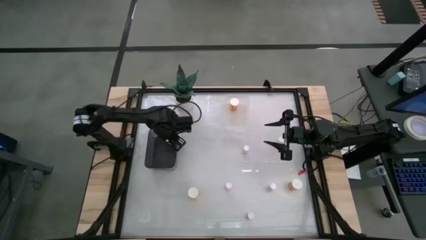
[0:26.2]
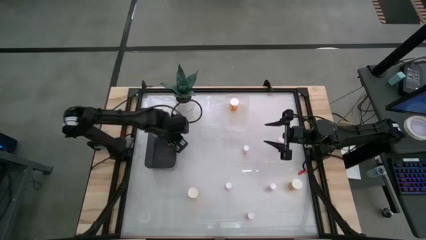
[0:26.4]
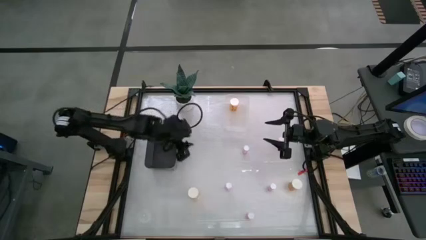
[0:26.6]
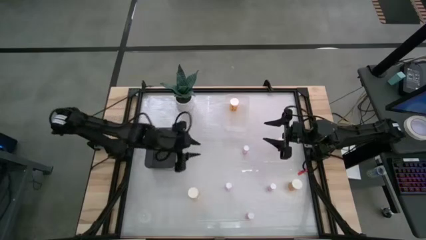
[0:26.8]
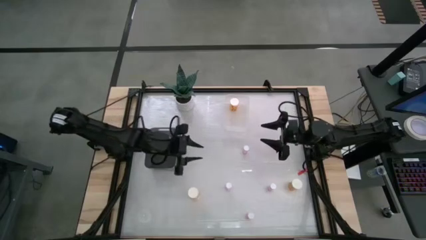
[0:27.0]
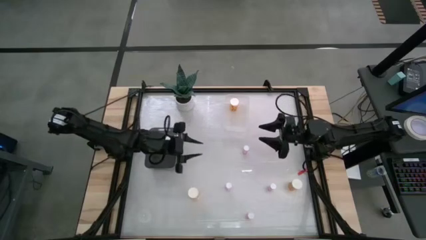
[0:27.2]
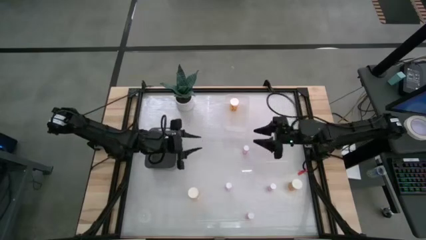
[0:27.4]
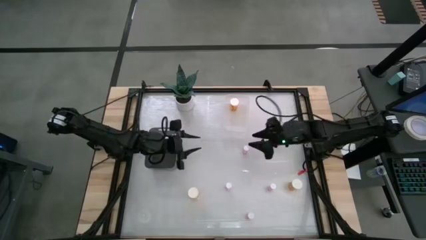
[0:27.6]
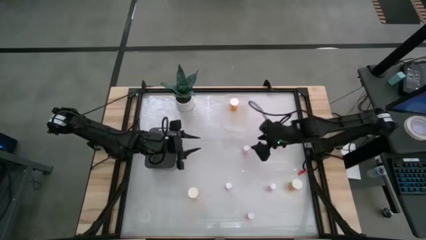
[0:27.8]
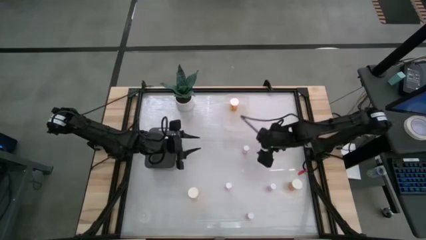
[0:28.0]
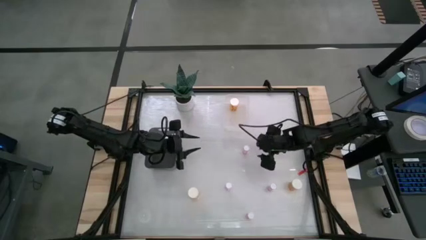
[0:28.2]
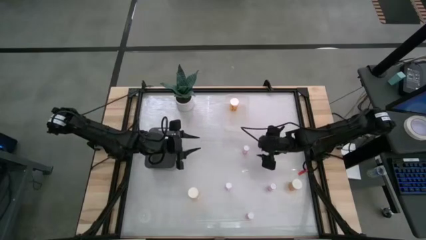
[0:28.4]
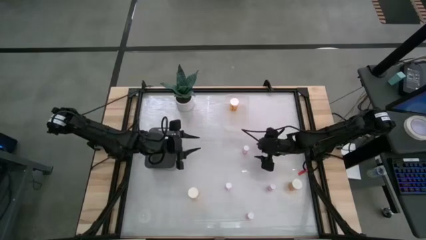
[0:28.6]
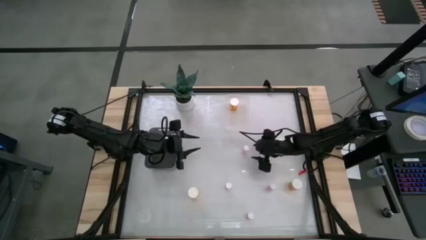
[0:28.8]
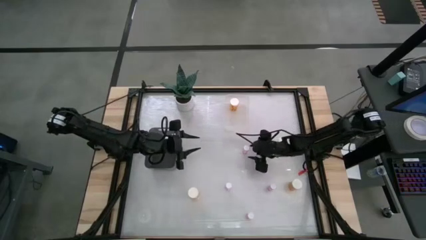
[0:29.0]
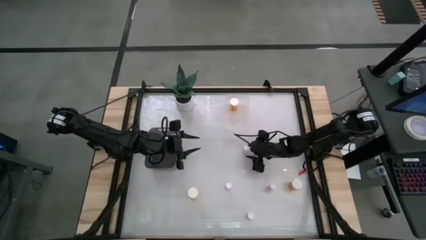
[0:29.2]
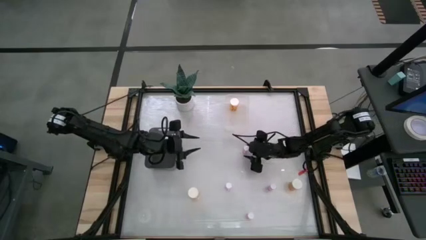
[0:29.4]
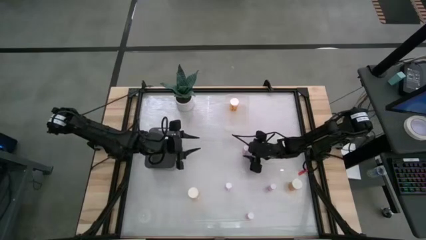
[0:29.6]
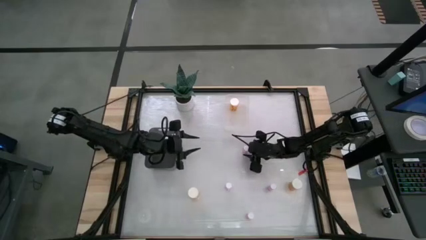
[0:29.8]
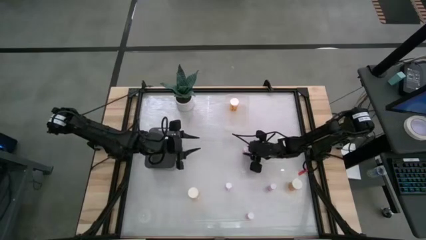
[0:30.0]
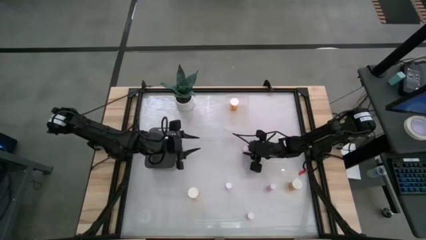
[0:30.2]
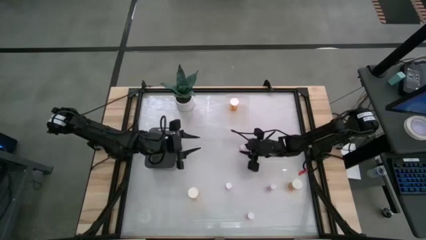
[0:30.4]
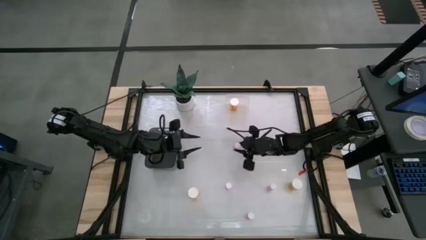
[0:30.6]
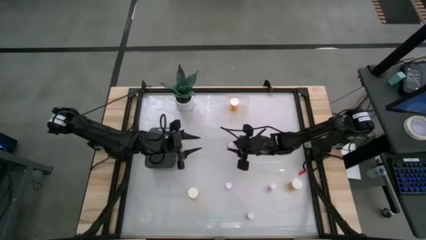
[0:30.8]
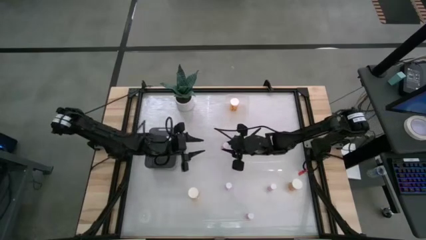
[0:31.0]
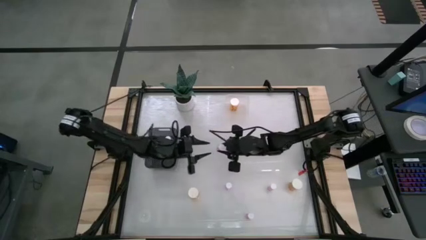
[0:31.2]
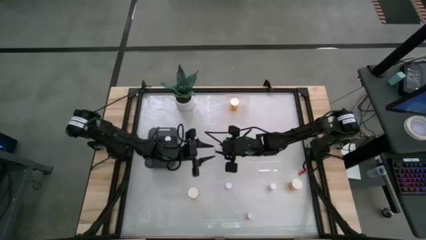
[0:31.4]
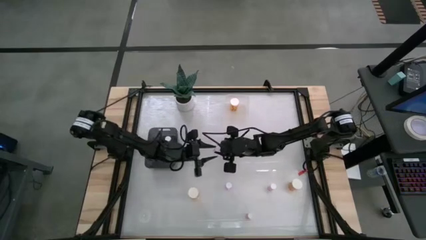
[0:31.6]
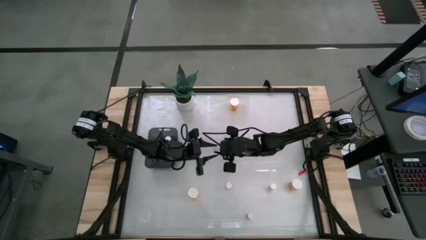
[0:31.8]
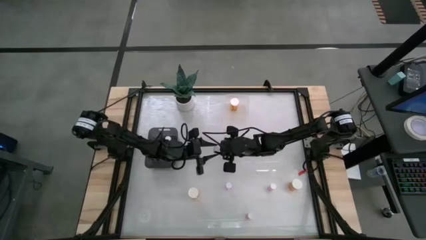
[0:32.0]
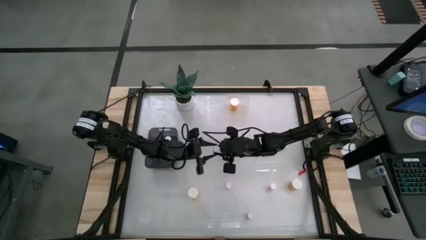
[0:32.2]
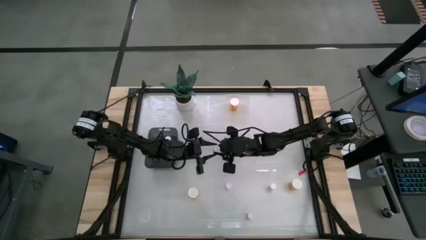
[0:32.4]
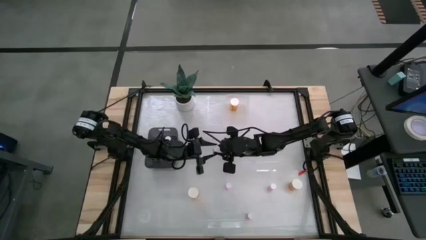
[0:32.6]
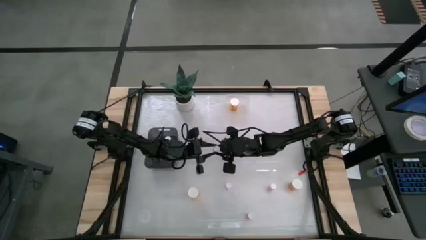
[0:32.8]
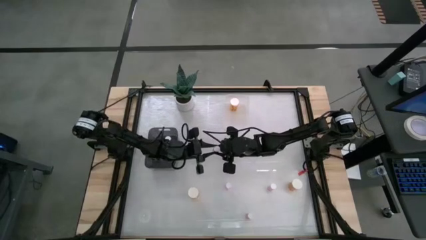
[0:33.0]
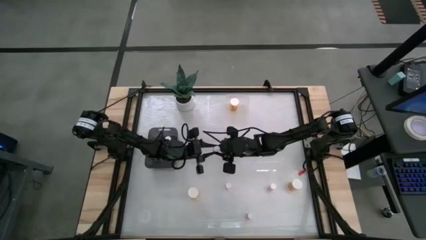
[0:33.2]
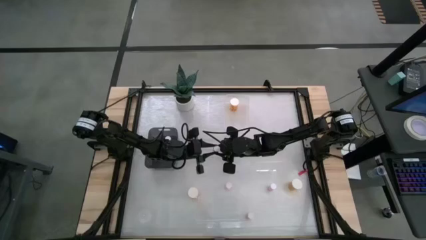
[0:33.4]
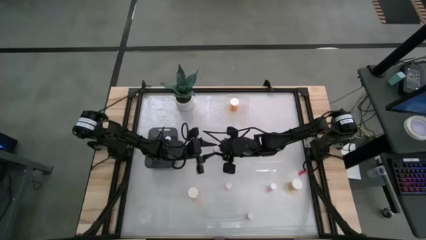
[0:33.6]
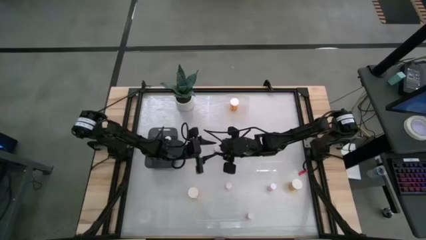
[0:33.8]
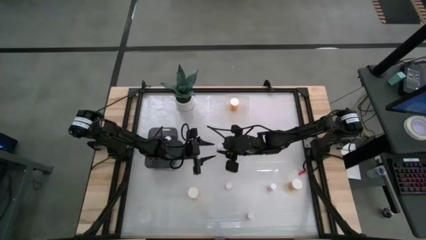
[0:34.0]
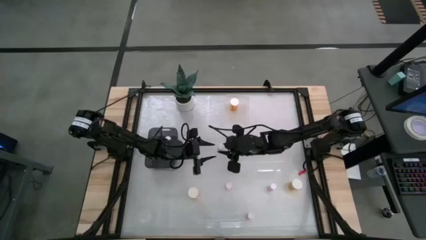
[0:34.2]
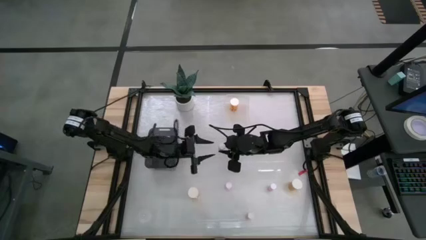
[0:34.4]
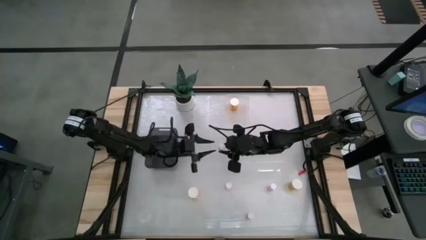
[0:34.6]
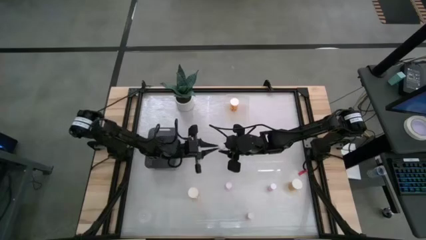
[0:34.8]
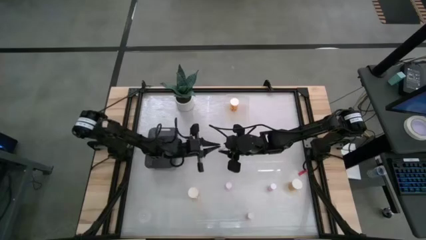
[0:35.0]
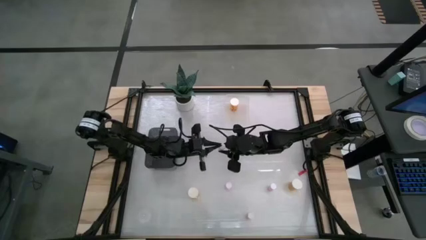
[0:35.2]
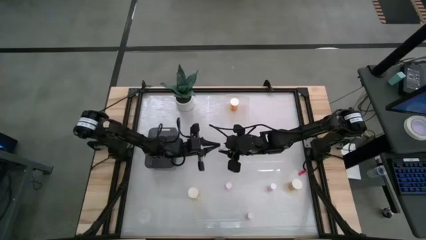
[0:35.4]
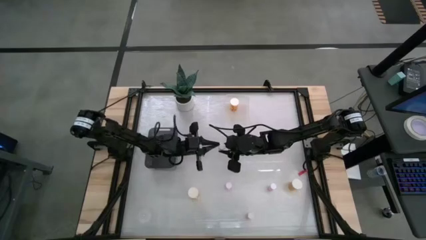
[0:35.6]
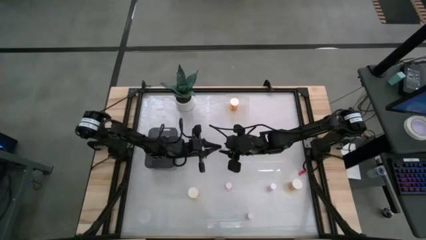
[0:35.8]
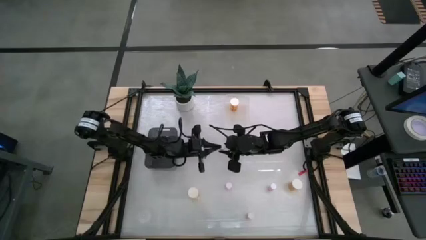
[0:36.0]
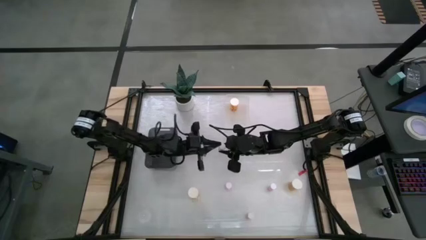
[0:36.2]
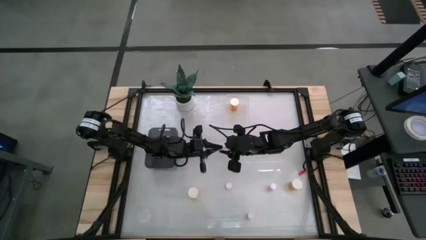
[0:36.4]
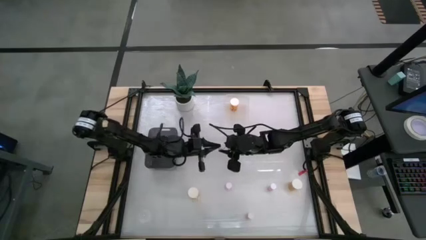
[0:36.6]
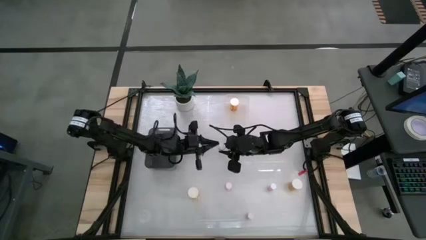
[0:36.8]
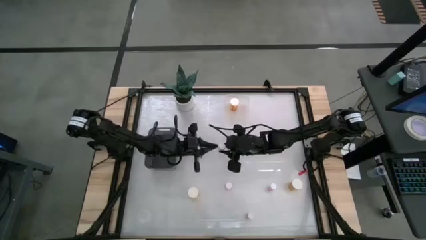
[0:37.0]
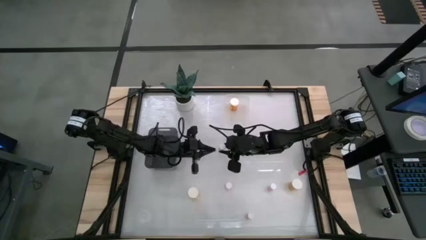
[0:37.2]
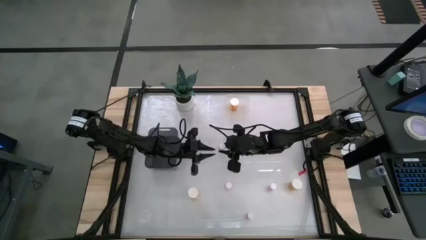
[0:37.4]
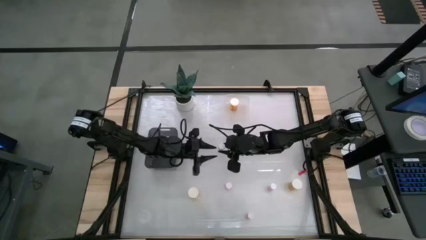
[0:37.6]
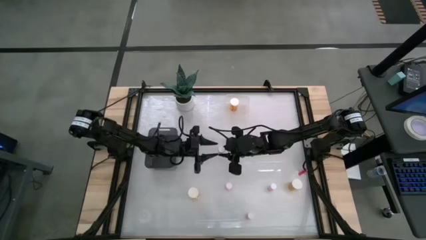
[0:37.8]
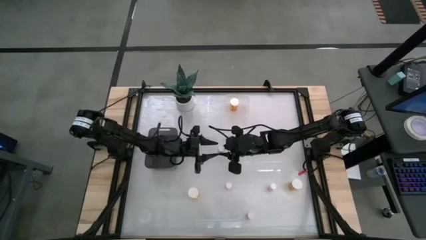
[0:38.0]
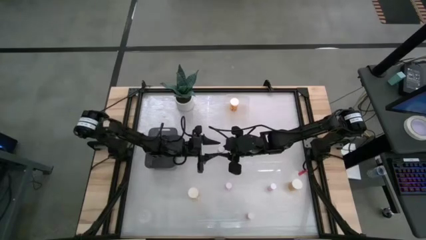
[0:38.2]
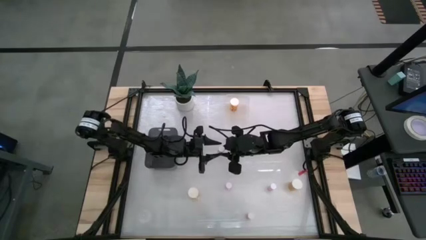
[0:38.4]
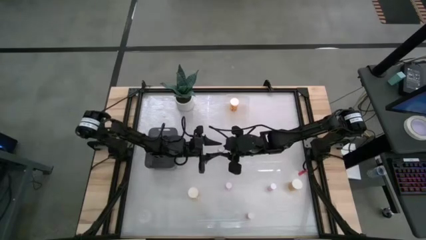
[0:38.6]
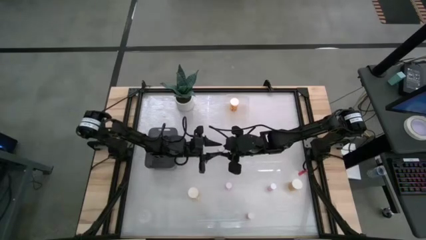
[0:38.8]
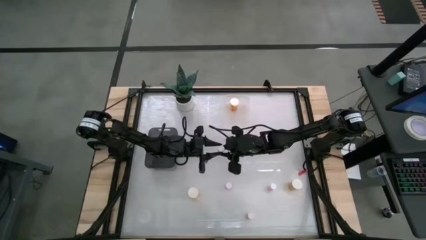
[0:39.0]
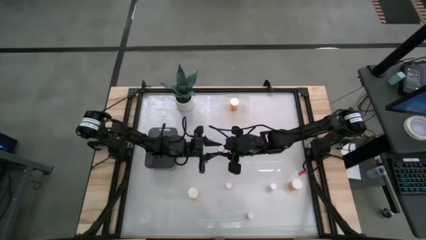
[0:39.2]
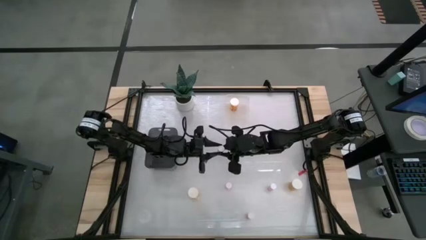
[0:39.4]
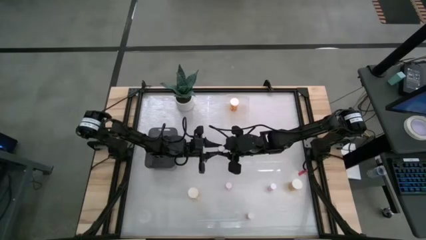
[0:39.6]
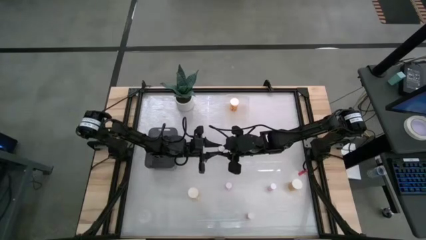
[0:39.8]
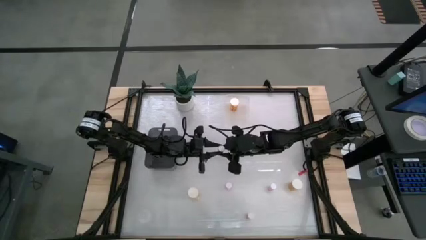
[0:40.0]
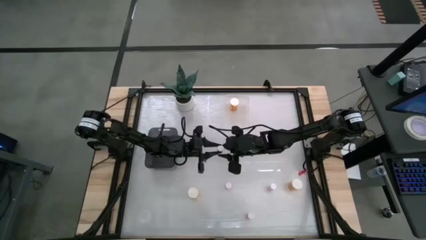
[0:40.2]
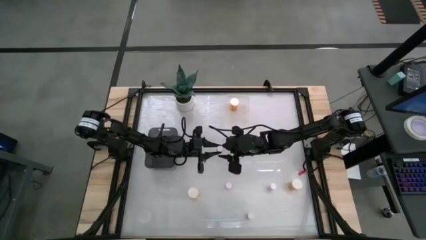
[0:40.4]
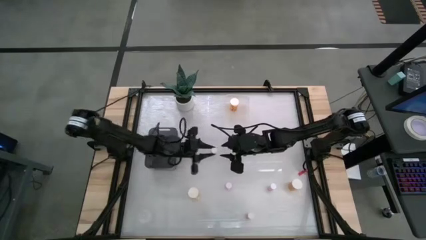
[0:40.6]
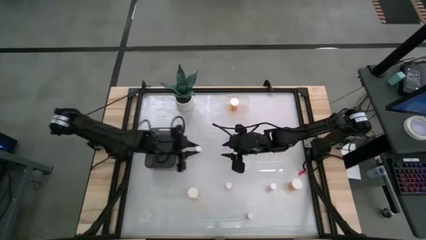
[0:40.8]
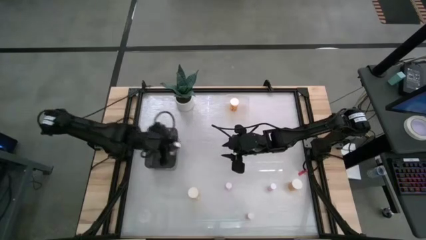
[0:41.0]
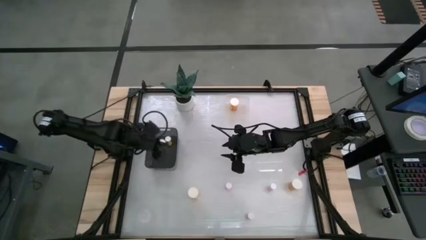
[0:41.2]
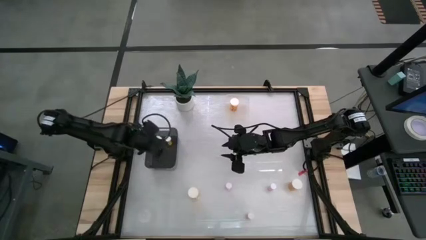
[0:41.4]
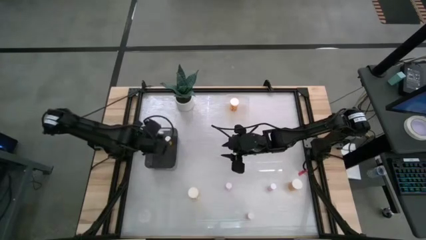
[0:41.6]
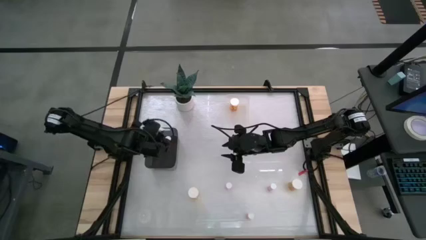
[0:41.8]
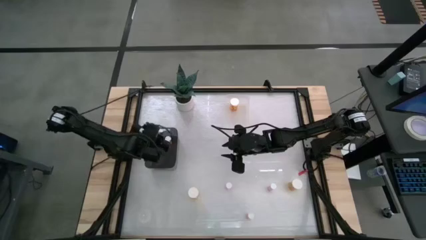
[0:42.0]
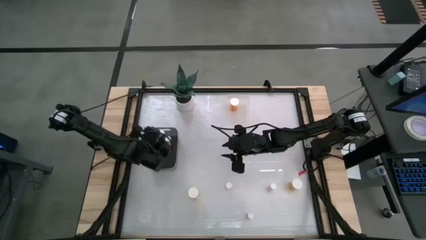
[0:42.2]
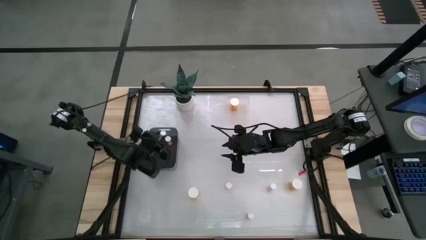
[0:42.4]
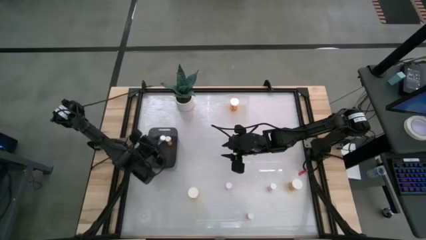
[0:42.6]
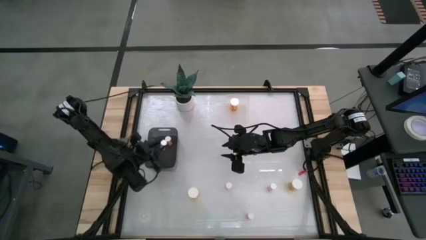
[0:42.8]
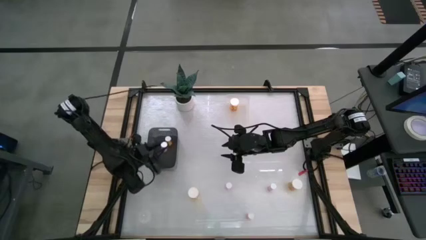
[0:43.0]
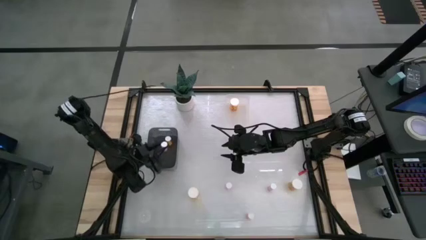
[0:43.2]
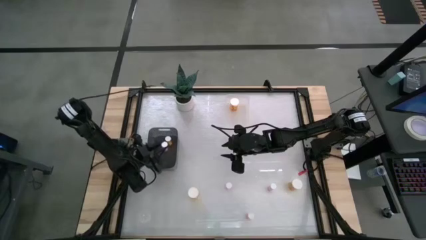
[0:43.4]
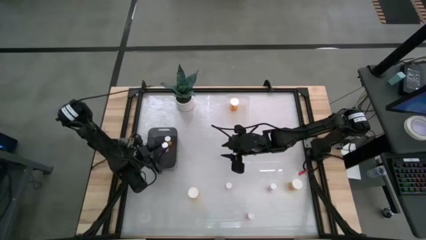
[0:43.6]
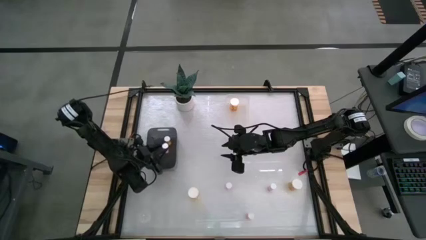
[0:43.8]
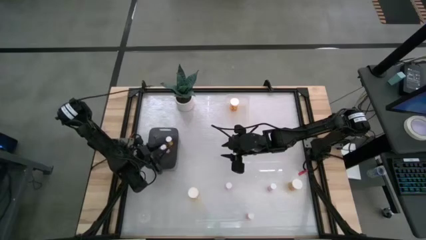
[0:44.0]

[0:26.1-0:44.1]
Task: Pick and place medicine bottles into bin by pill shape (circle, oval)
Put the small pink pill bottle into the black bin
